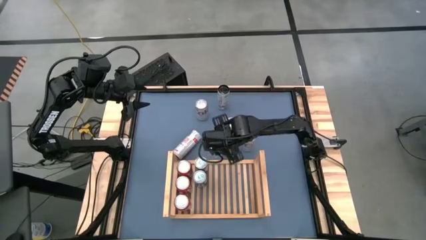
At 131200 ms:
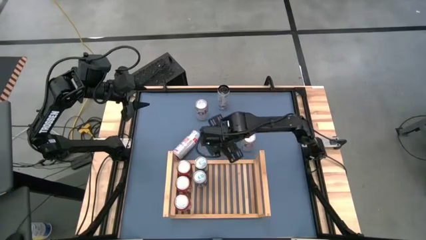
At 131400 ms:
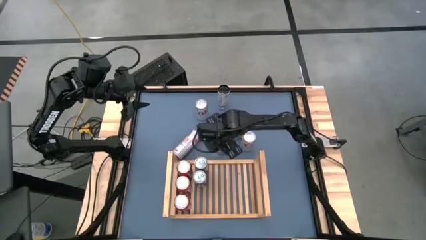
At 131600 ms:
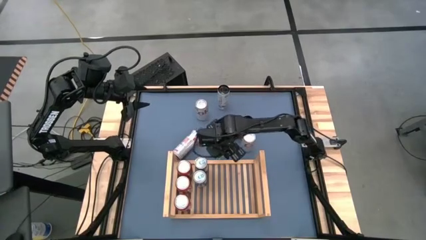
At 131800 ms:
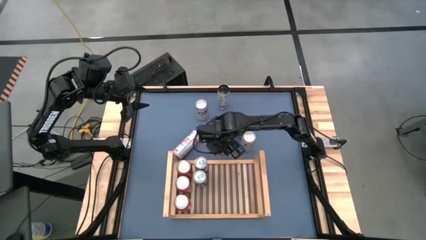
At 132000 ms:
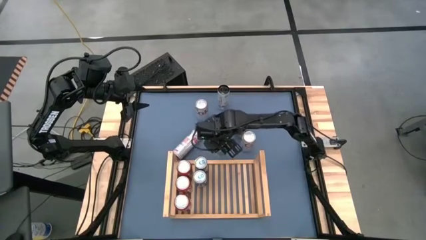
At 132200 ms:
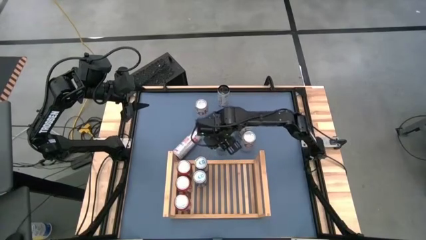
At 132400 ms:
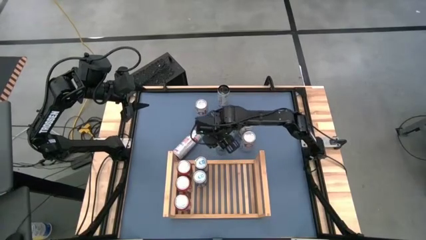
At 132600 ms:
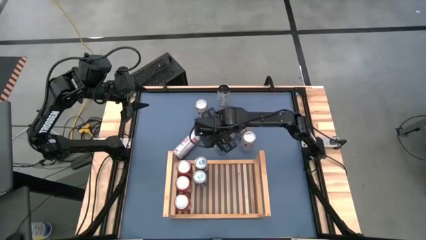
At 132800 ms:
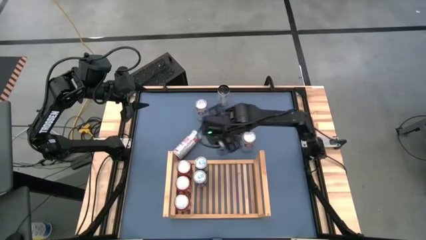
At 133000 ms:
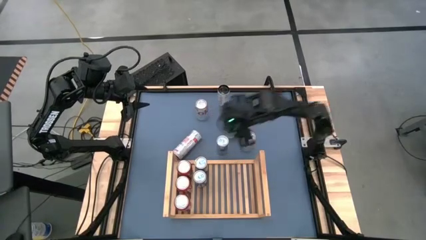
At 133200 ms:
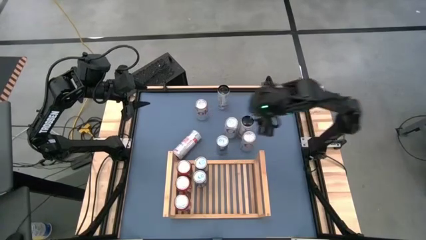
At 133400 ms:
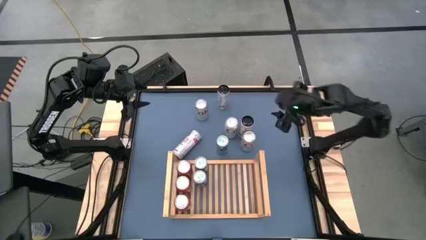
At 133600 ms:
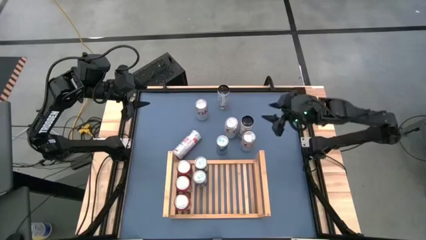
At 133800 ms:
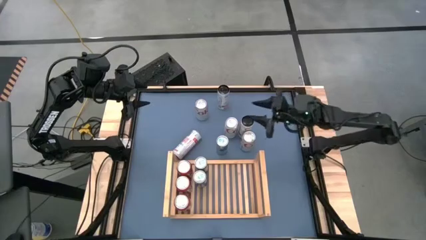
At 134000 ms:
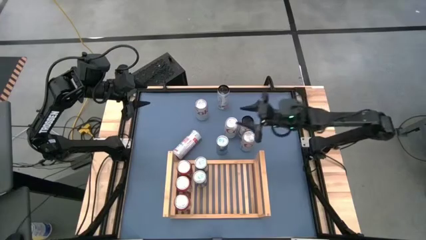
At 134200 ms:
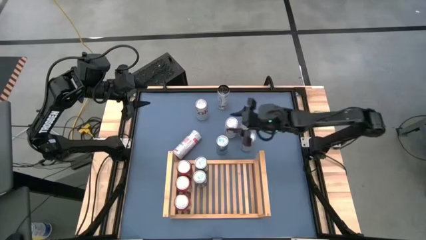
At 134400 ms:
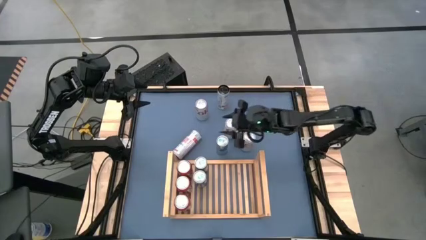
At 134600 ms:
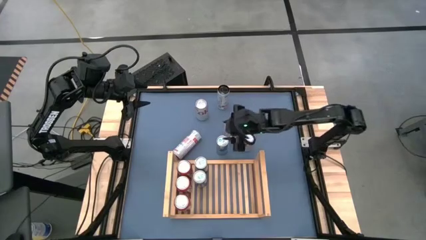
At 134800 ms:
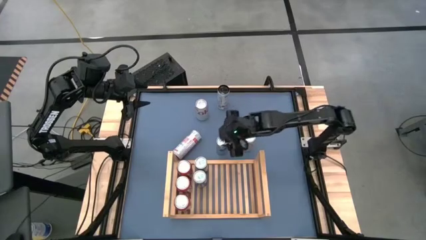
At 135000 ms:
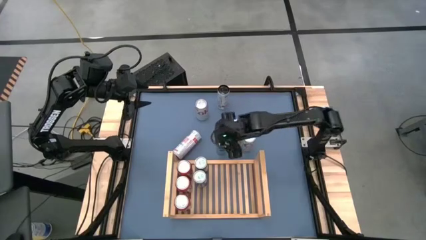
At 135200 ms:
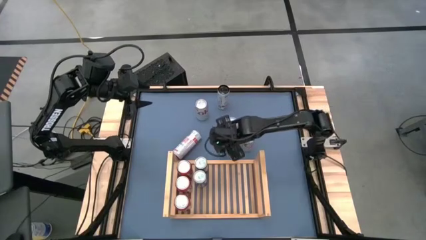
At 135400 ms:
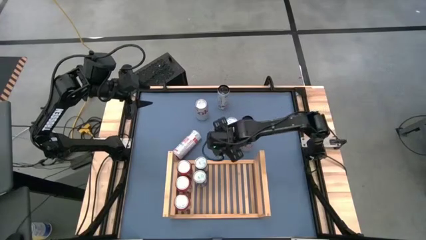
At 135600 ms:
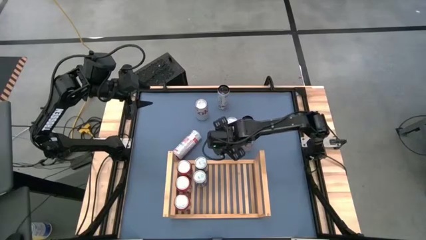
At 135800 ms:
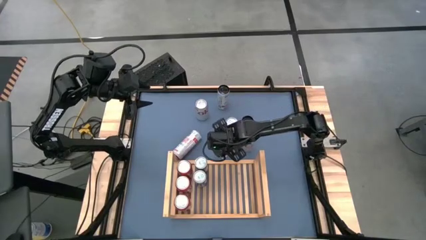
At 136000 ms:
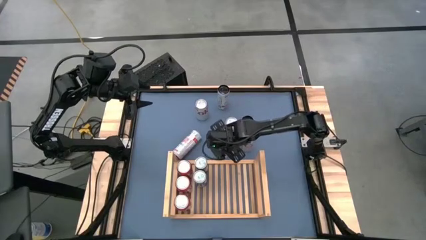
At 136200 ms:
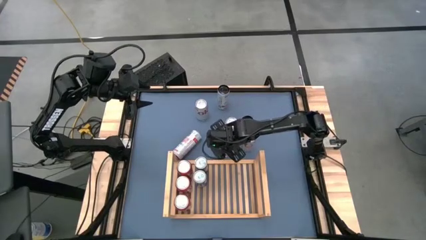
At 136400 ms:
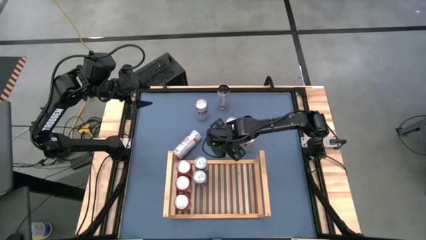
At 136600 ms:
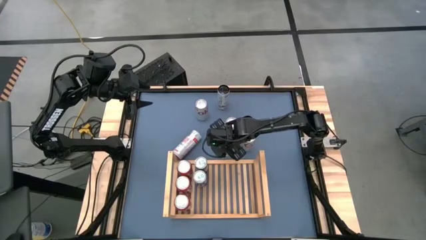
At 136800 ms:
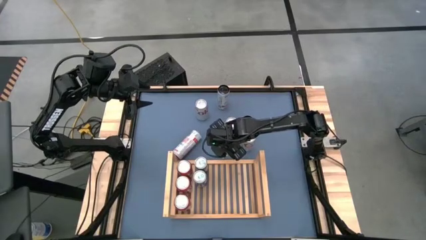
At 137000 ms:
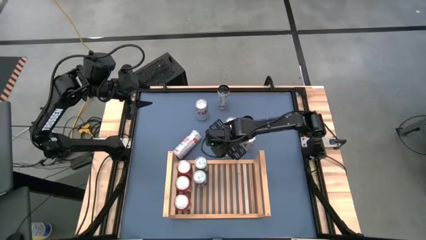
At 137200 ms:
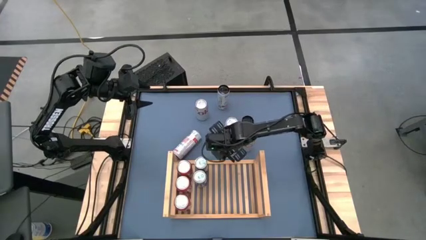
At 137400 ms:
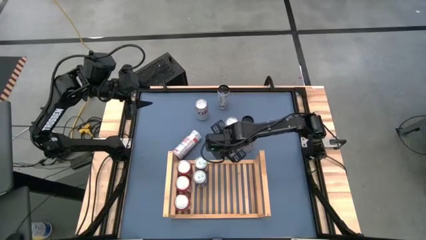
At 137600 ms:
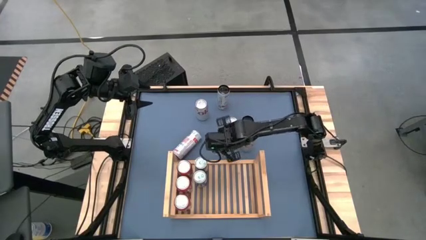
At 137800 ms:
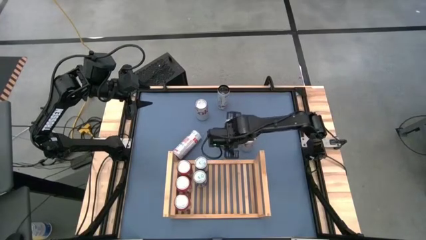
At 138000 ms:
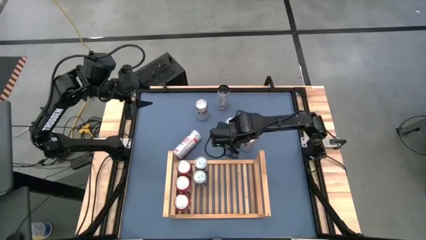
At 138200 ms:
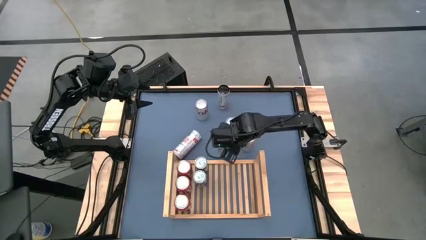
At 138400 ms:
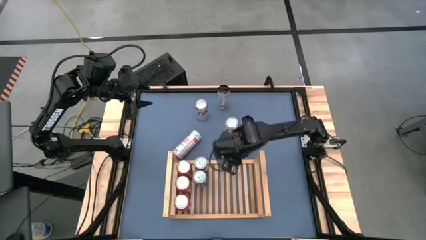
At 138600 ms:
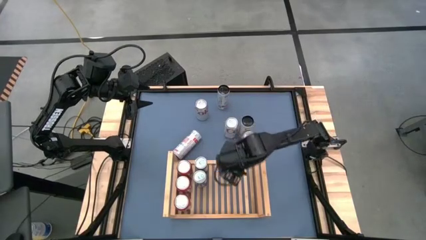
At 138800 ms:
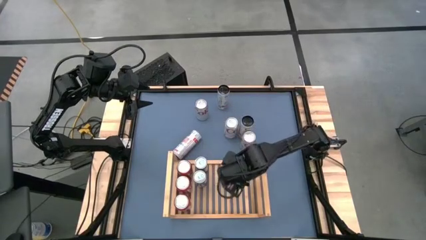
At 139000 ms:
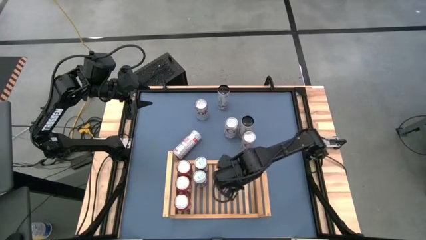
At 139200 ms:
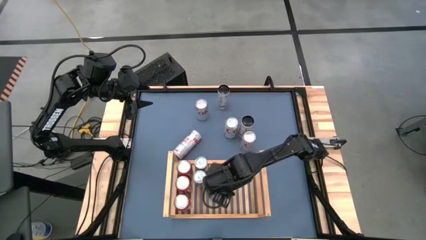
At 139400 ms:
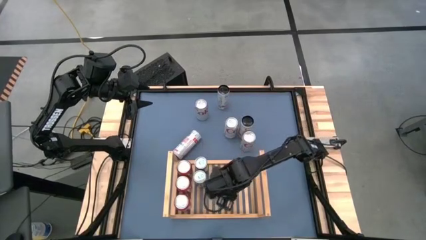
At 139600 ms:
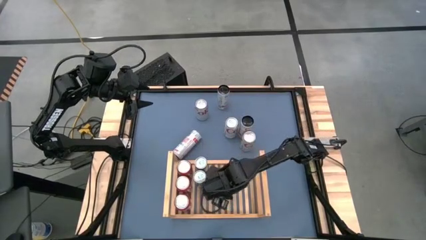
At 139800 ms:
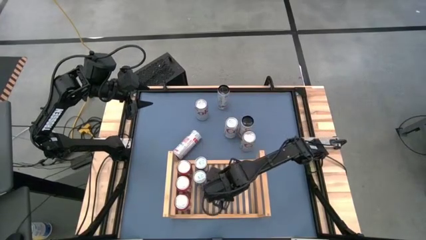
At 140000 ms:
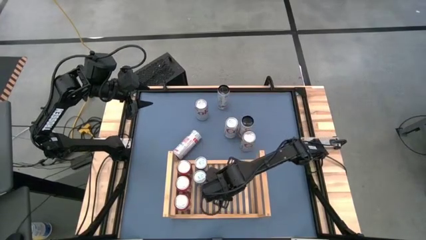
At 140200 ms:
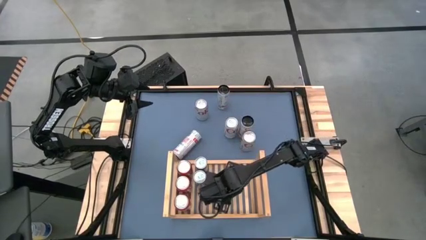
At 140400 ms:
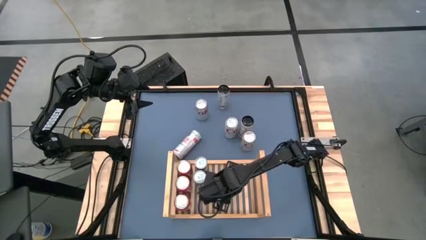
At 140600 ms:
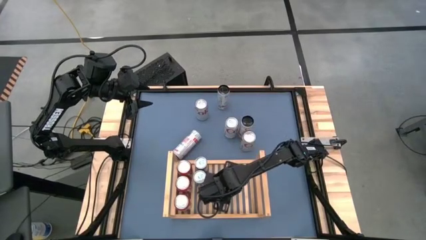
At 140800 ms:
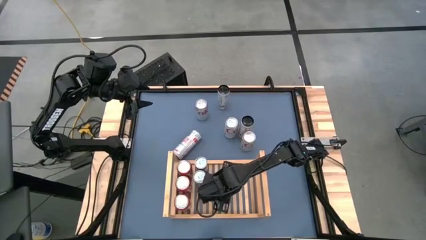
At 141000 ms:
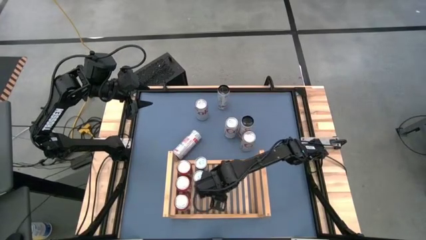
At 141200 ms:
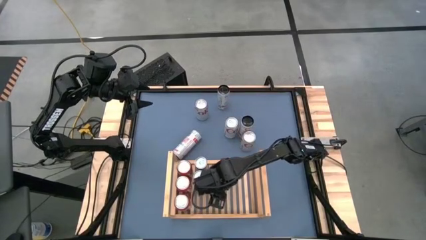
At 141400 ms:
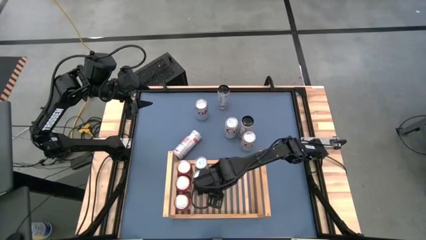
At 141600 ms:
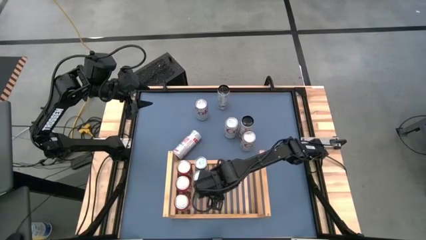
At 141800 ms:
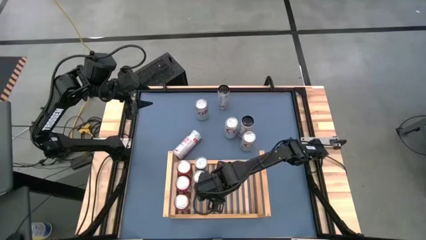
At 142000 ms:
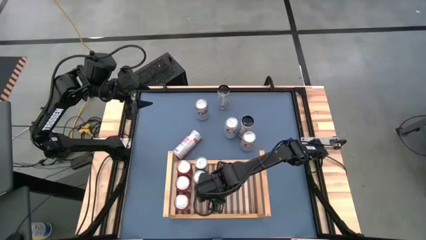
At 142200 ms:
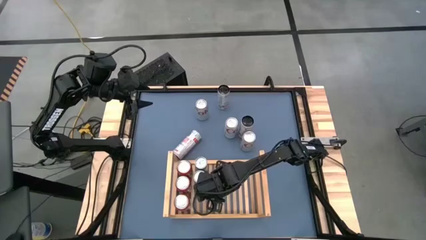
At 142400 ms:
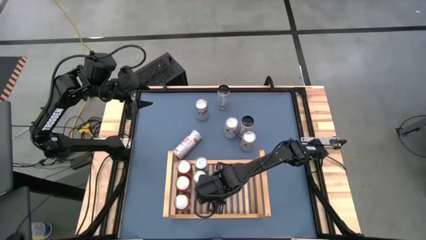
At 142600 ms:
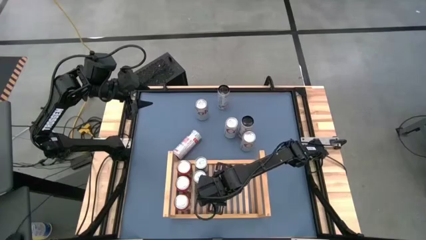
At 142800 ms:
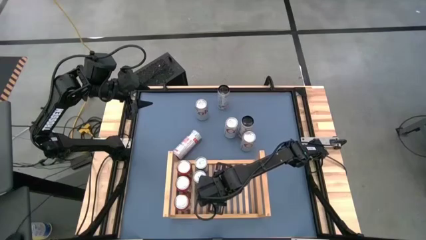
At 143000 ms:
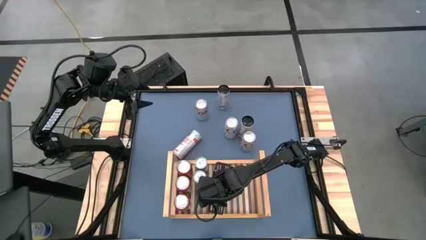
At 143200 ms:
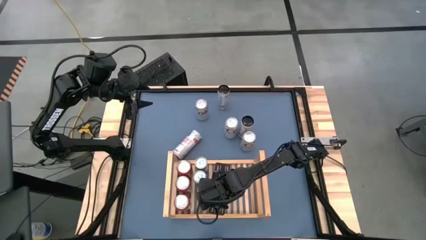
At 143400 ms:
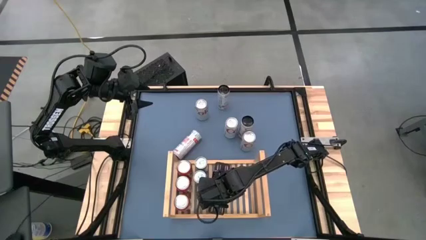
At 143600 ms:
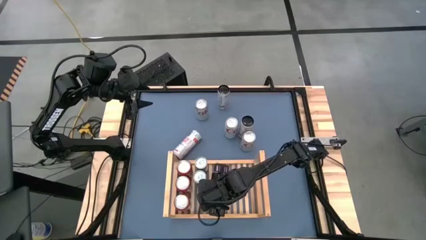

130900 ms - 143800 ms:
Task: Place canned beverage on shelf
Put the blue soda can on the shelf aligned with the other blue soda can
